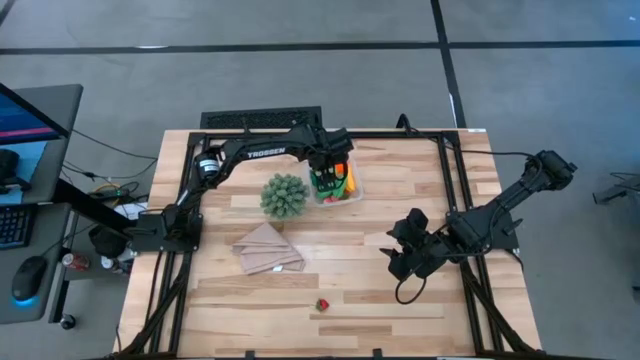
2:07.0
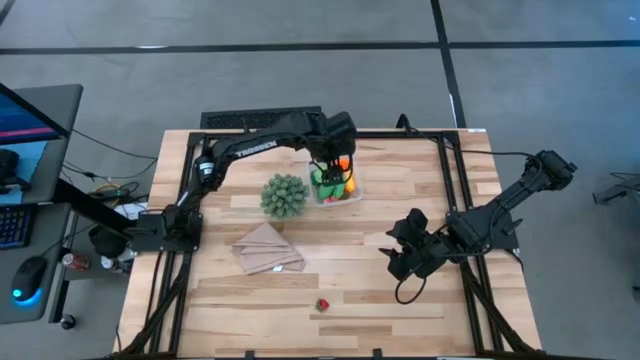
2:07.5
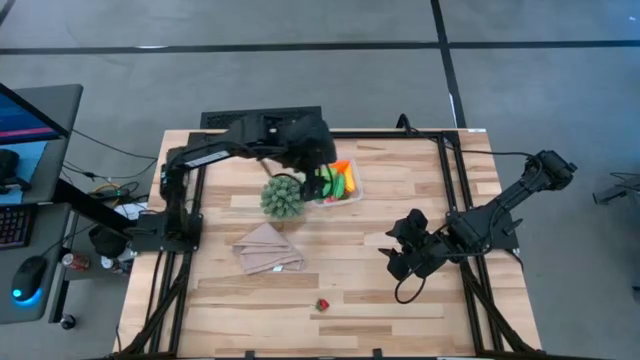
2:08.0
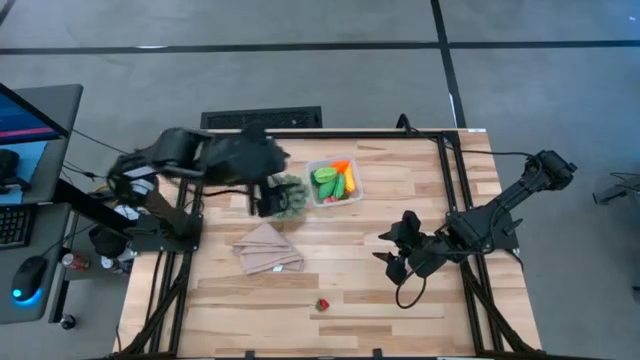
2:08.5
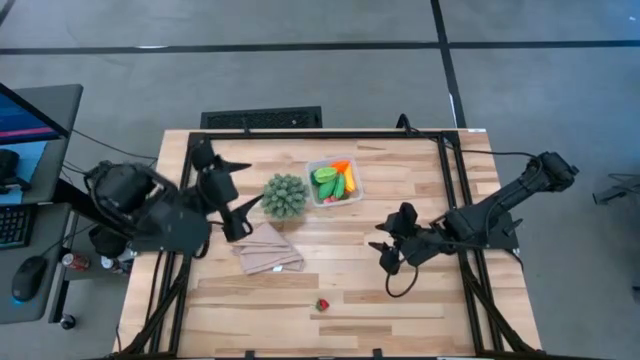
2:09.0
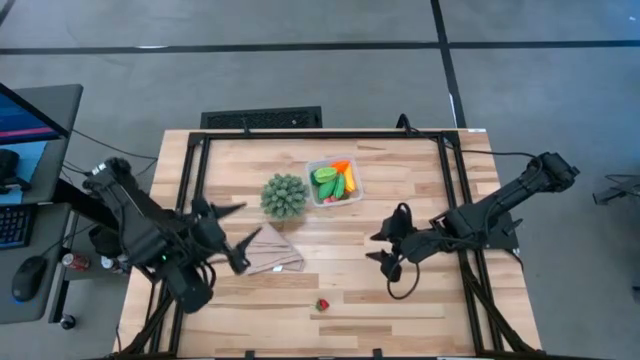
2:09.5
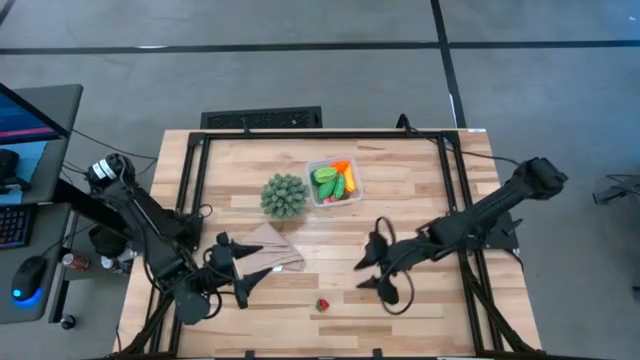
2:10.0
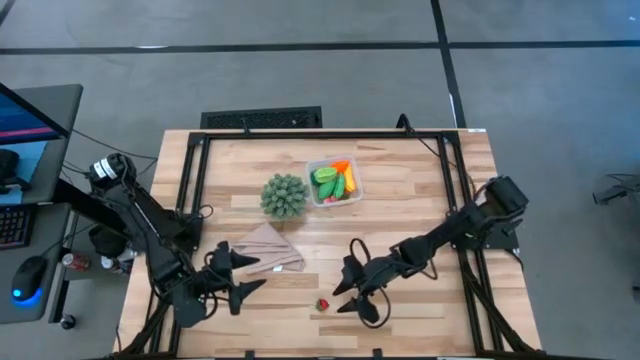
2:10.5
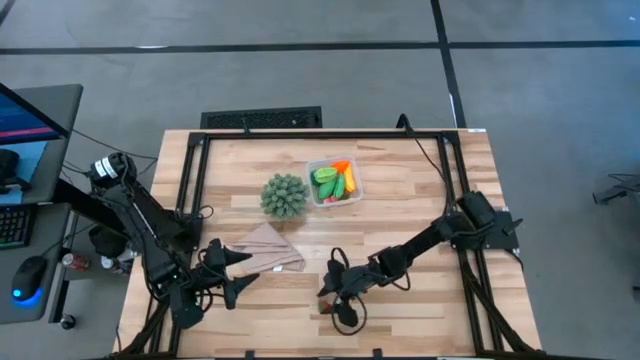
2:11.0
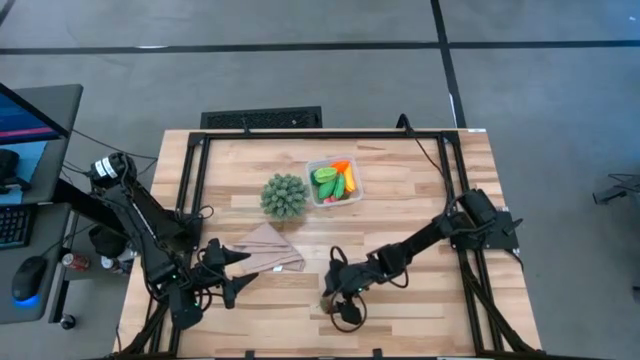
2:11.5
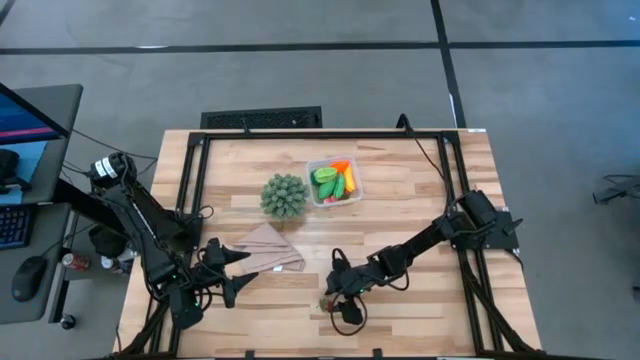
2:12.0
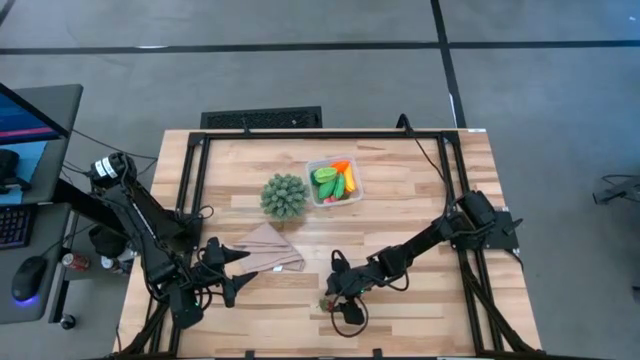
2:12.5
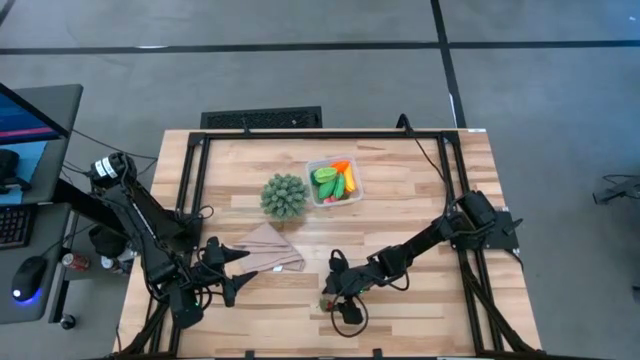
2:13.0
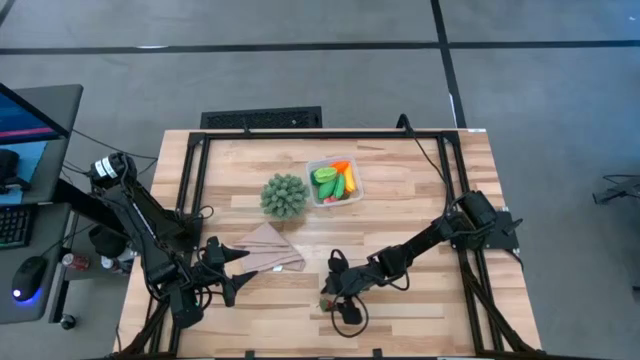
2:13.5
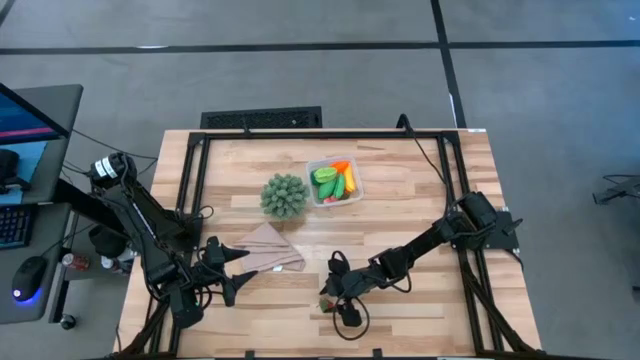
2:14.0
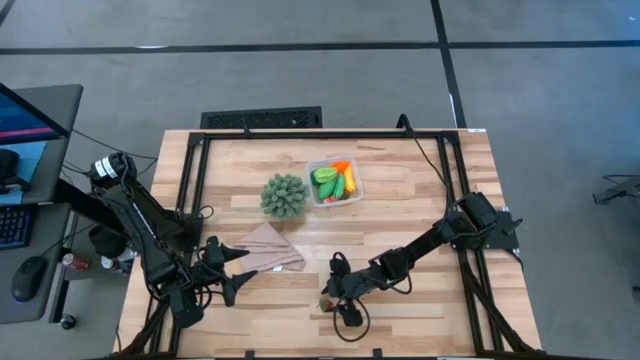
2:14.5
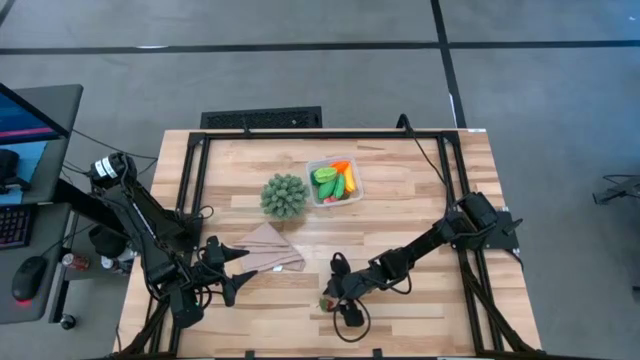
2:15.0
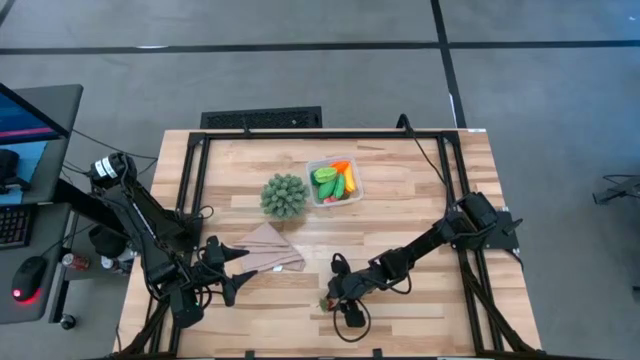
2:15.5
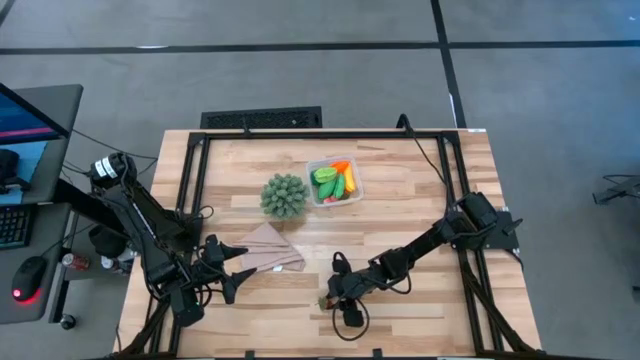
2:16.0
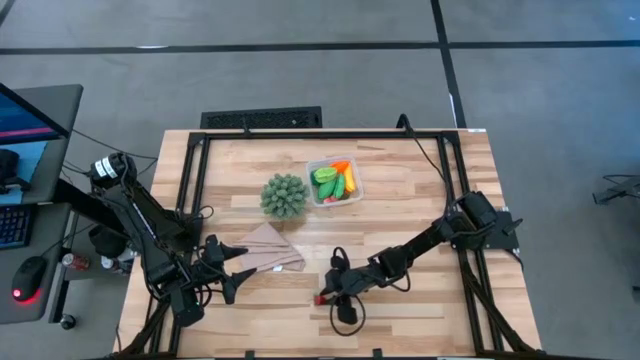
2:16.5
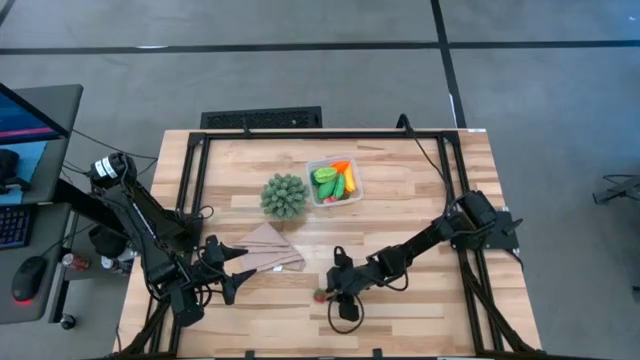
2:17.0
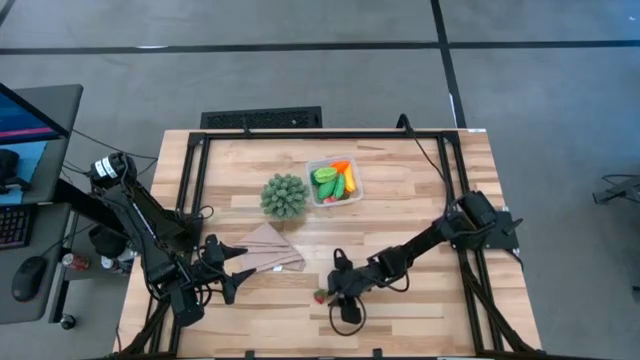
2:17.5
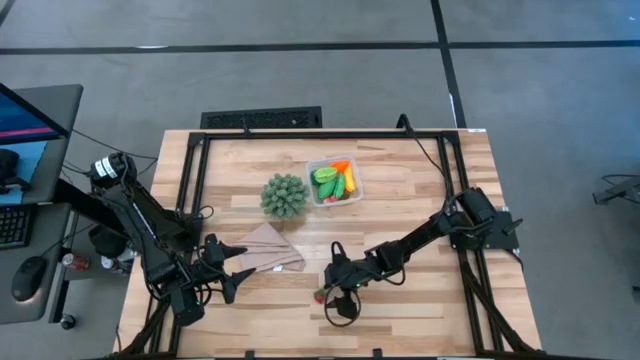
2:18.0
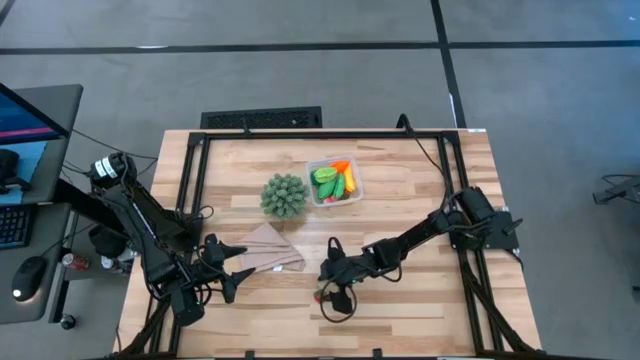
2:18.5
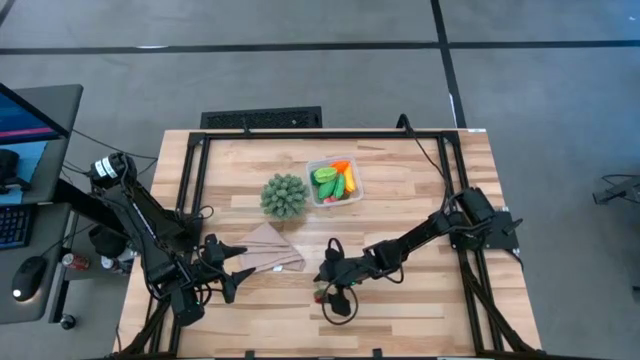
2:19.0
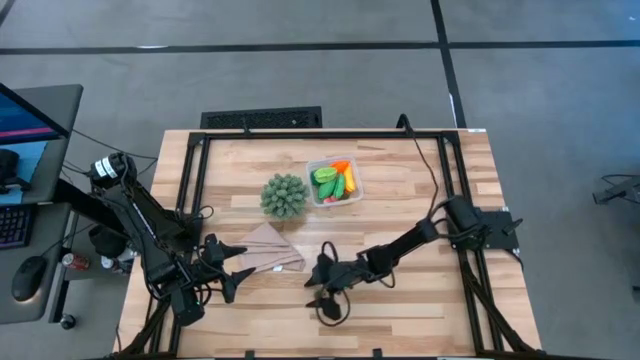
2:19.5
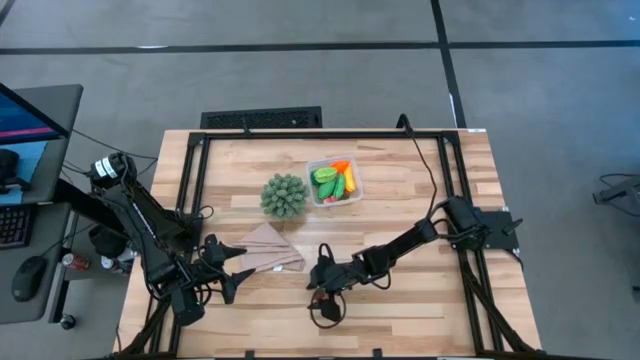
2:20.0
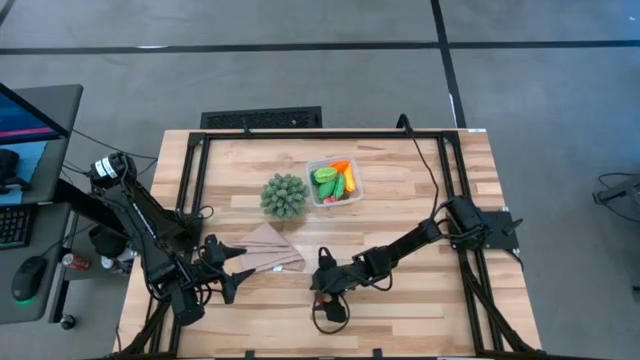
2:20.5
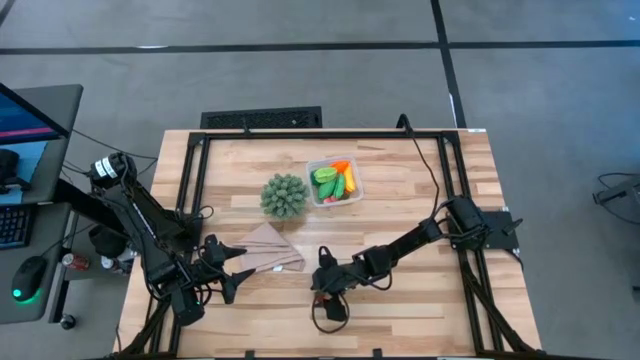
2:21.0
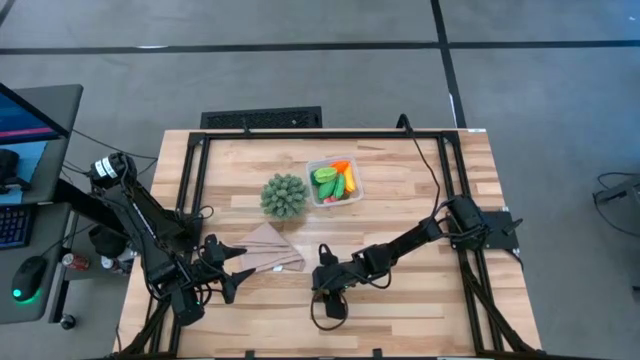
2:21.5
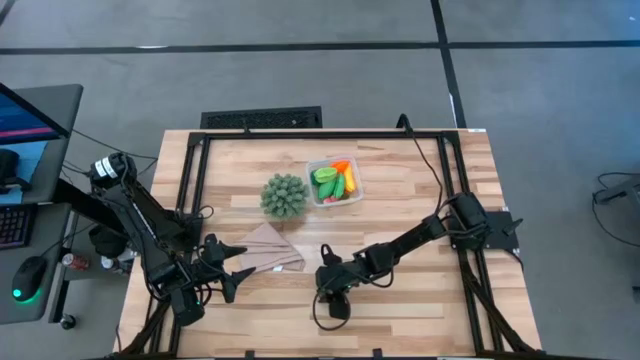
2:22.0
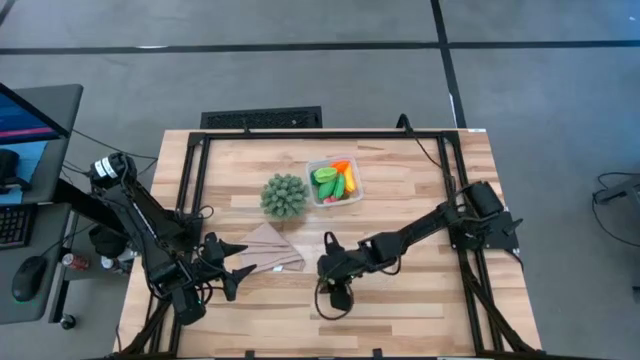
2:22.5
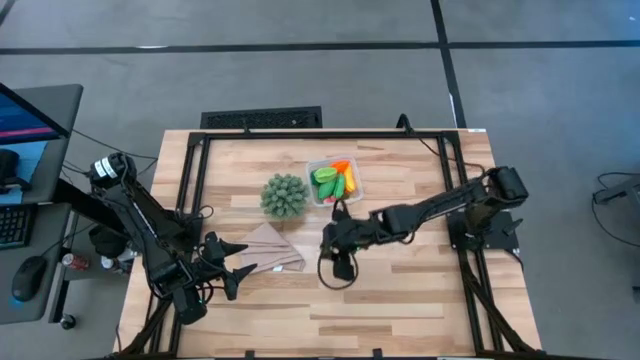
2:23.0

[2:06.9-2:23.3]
Task: Pick and placing Produce into tupperware
Put the strawberry into the transparent bin

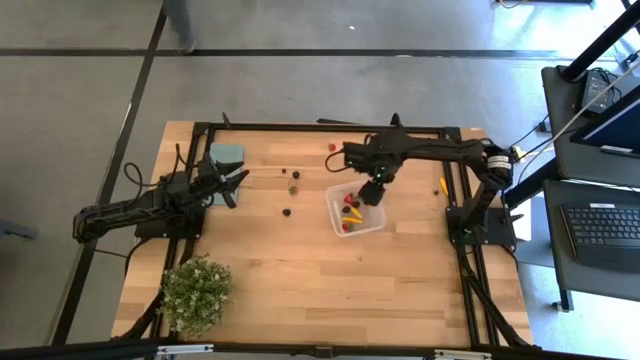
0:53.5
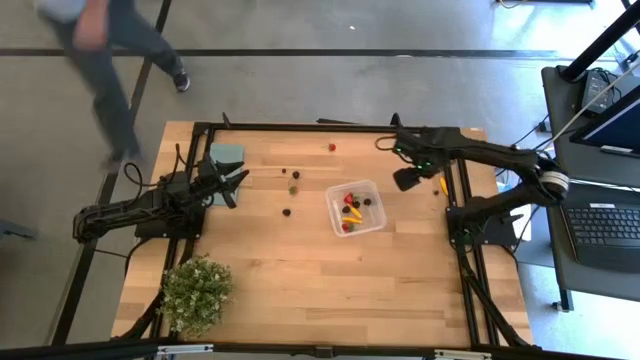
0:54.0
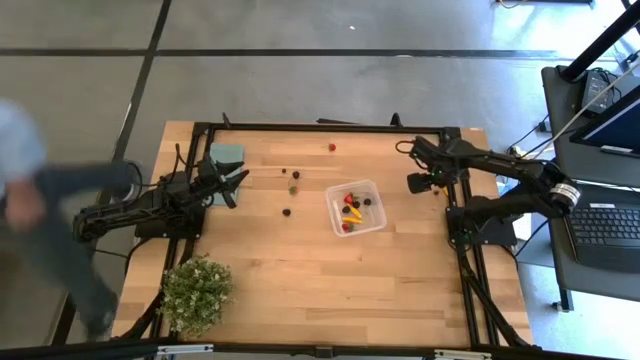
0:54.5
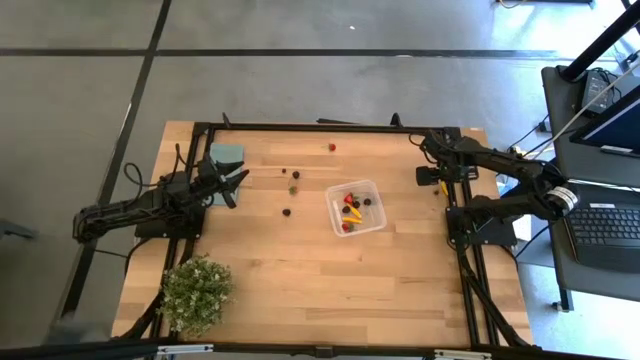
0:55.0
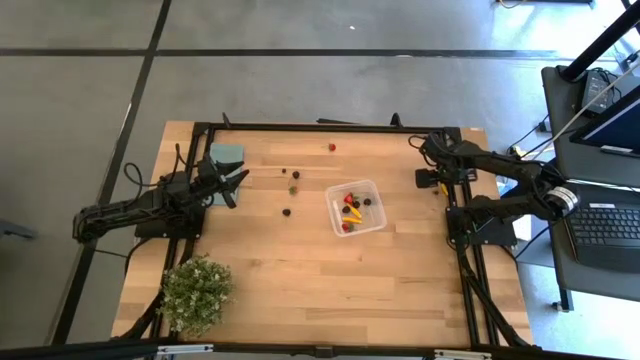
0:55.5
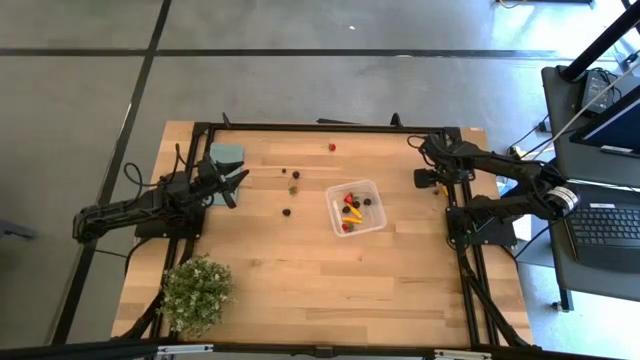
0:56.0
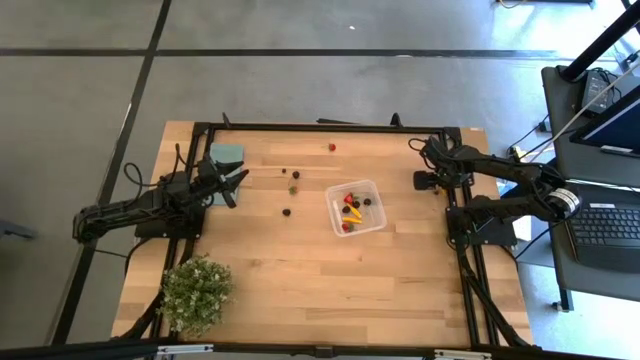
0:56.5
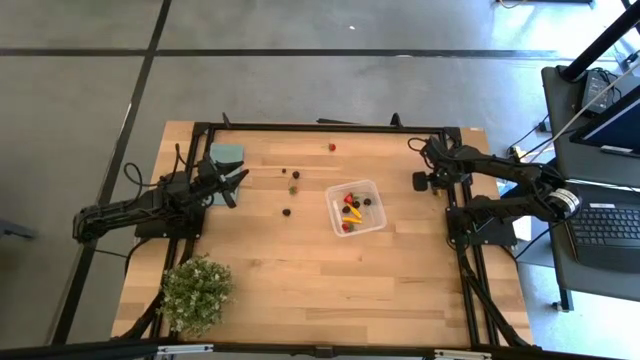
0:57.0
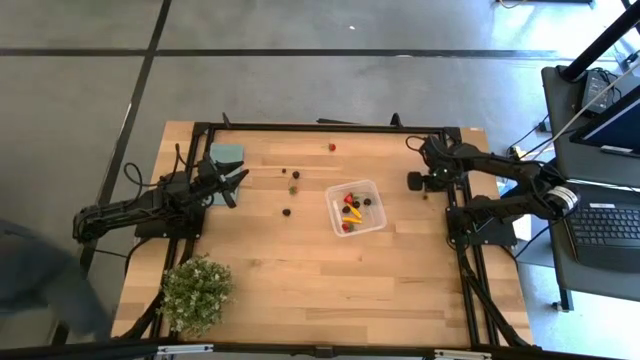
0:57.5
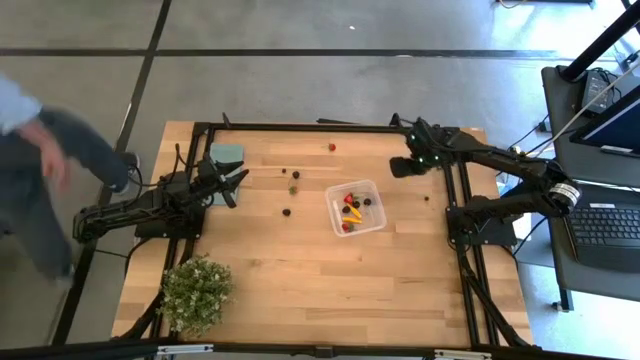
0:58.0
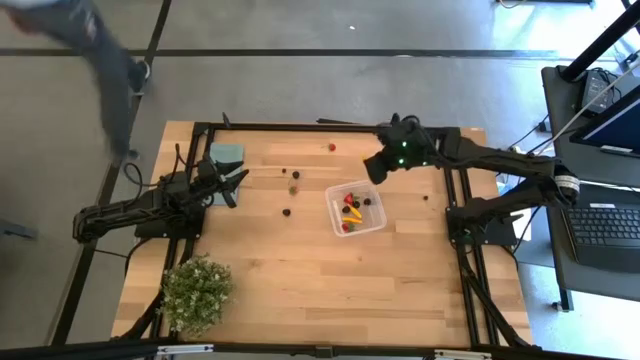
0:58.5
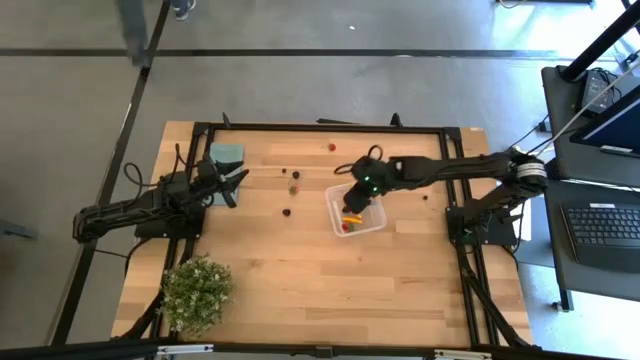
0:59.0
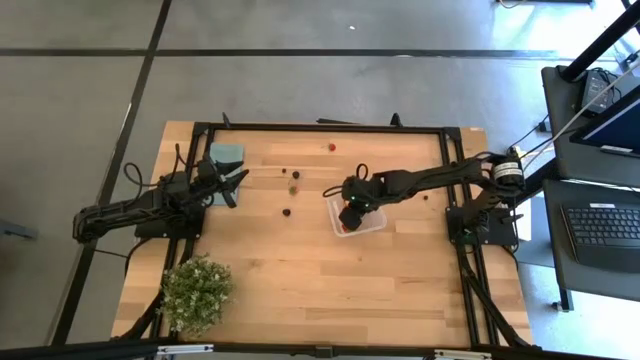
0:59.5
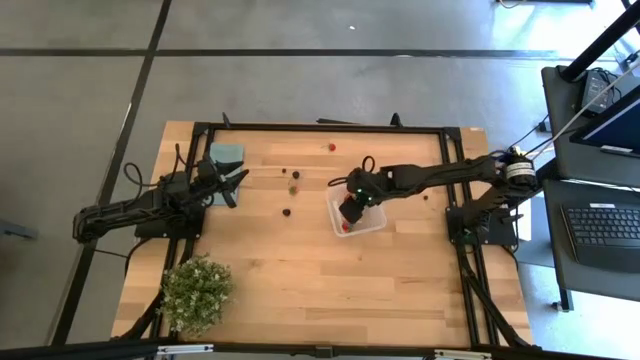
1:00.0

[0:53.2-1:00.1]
Task: Pick and placing Produce into tupperware
Put the corn into the transparent bin
